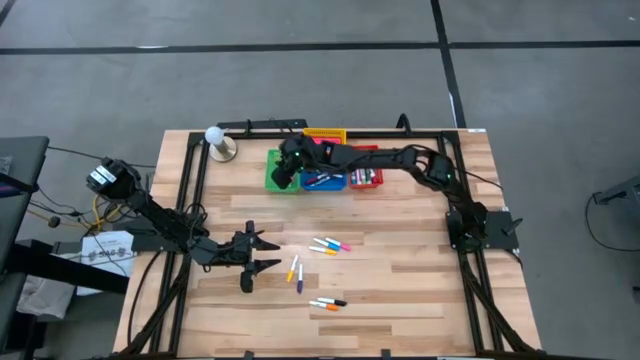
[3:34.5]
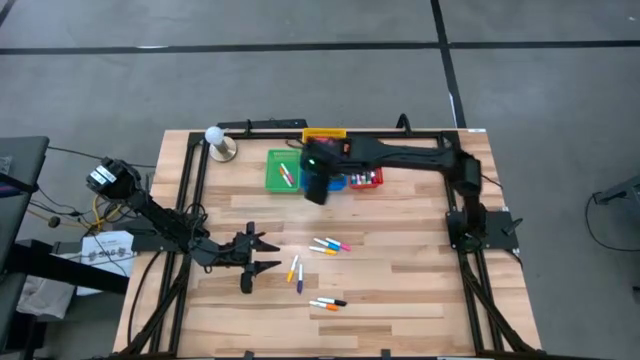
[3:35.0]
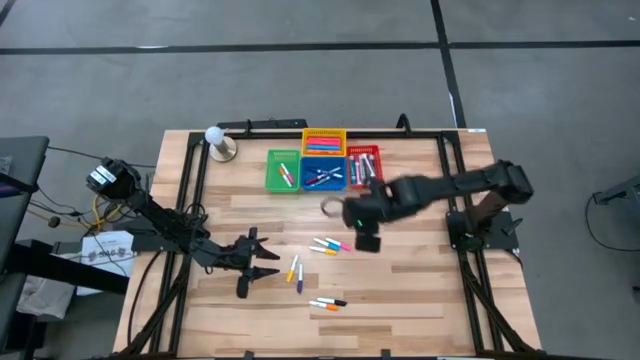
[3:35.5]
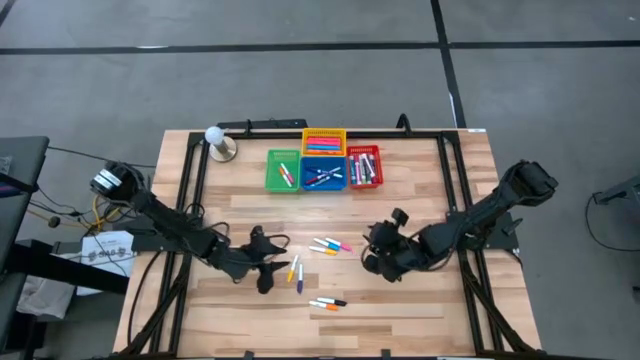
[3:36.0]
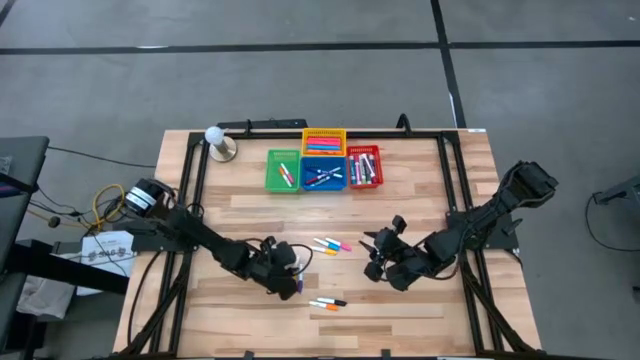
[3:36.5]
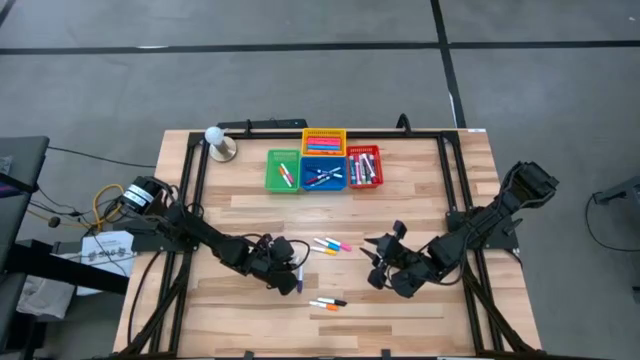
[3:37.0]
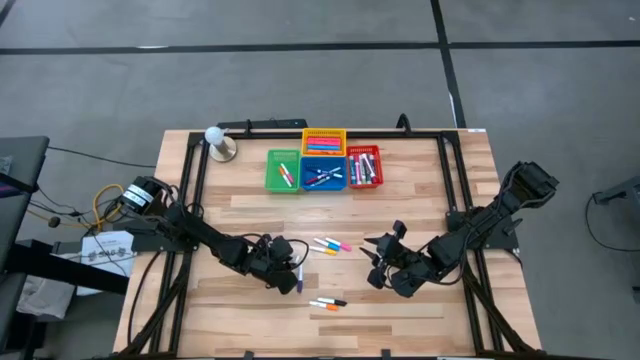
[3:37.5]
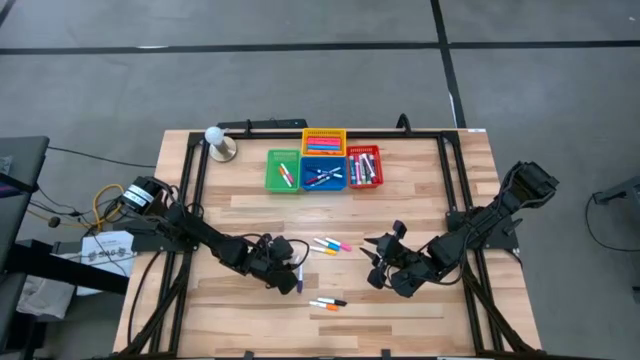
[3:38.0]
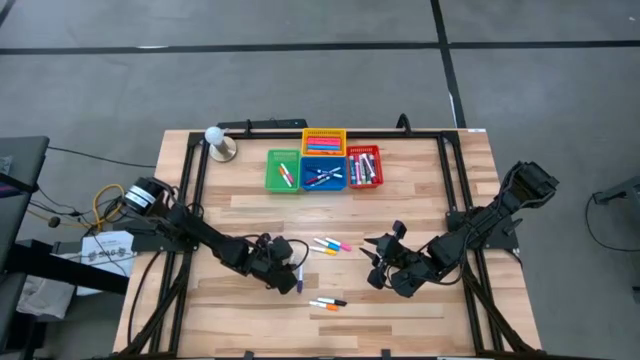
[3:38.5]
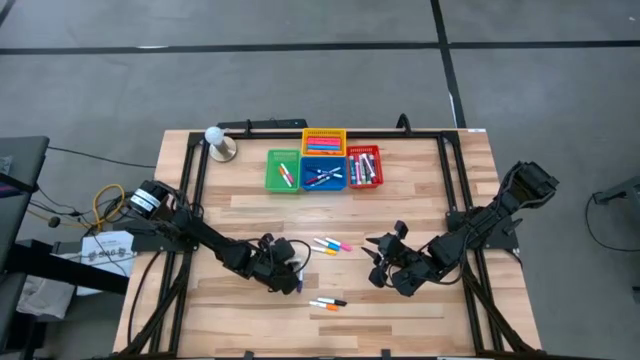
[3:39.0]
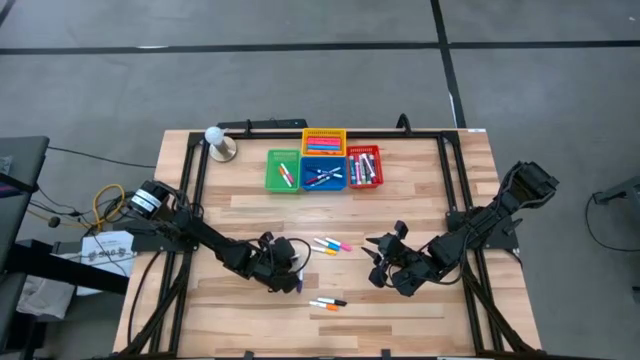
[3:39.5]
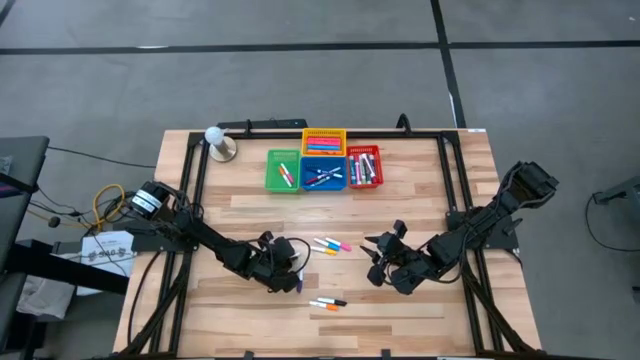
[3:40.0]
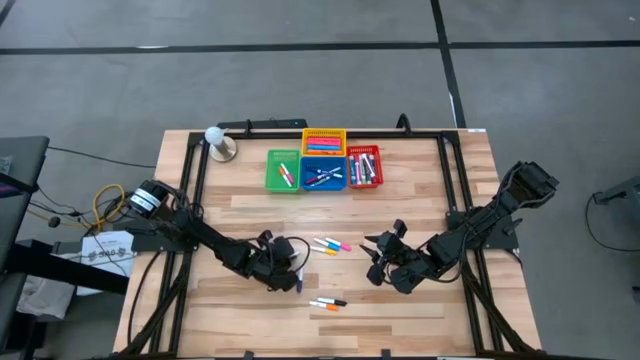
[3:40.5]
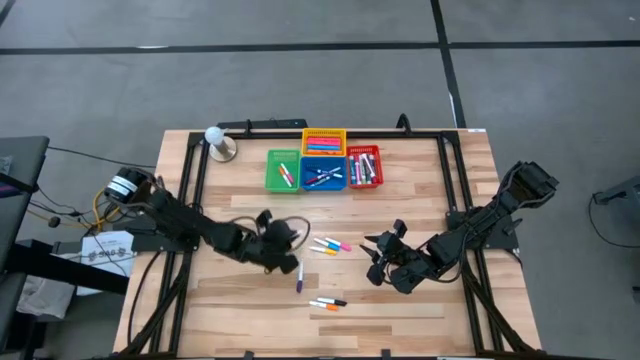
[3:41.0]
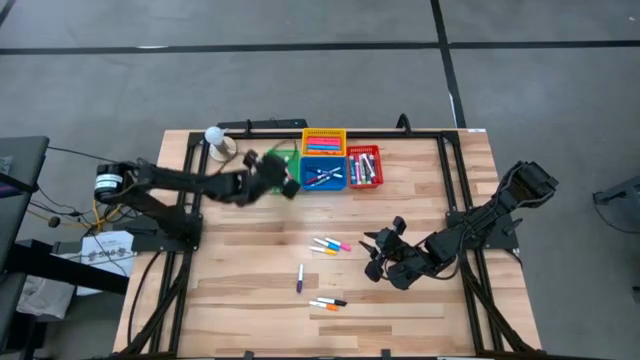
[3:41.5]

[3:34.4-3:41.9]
Task: Pick & Place Markers
Put the bottom small yellow highlighter pen into the green bin

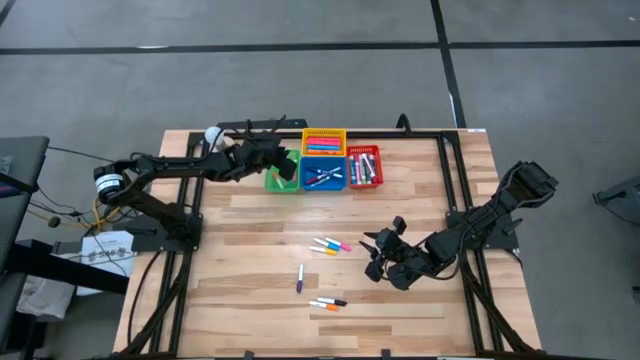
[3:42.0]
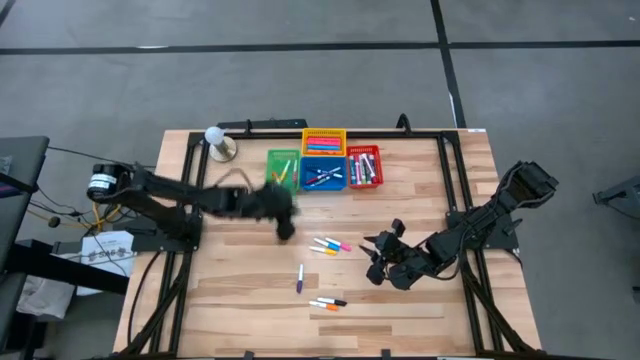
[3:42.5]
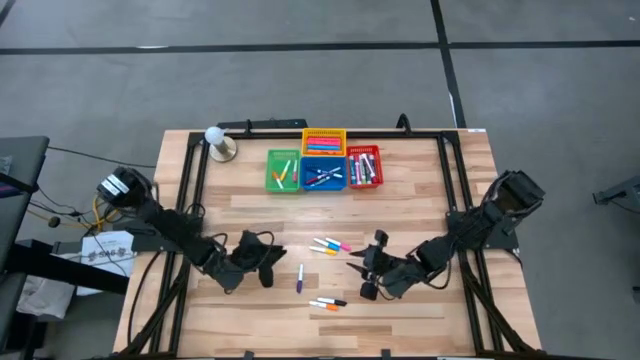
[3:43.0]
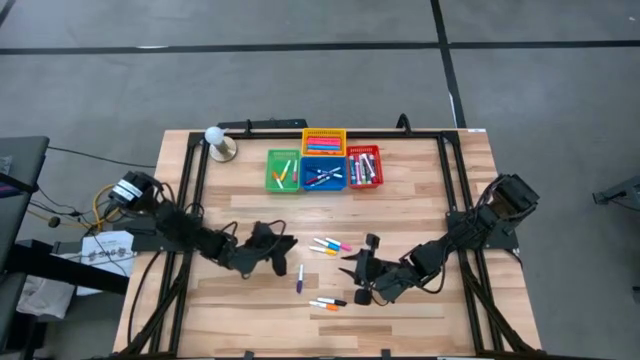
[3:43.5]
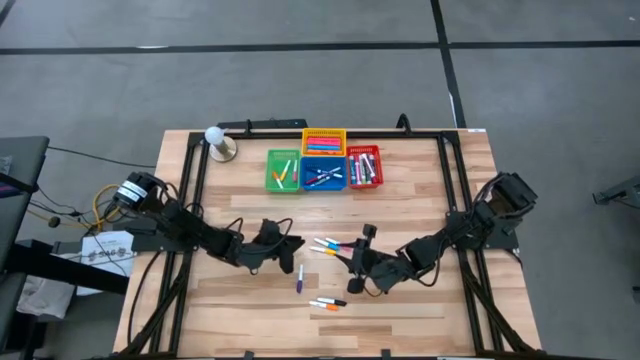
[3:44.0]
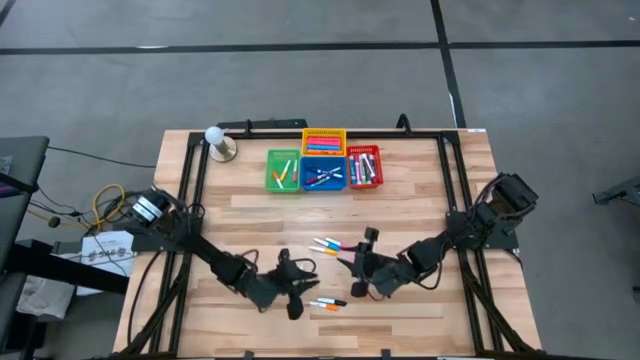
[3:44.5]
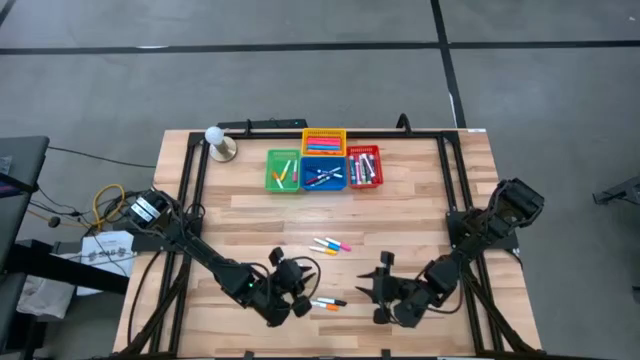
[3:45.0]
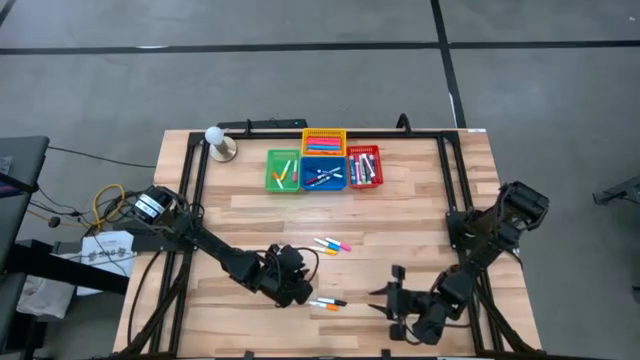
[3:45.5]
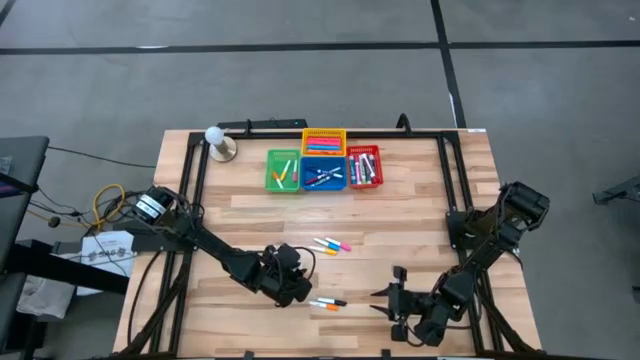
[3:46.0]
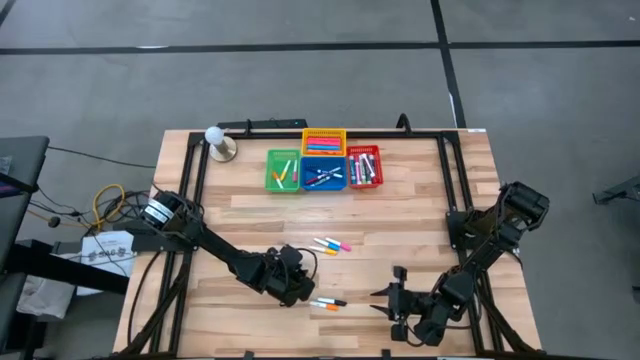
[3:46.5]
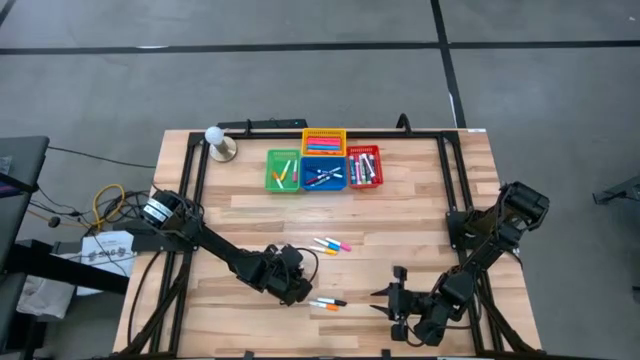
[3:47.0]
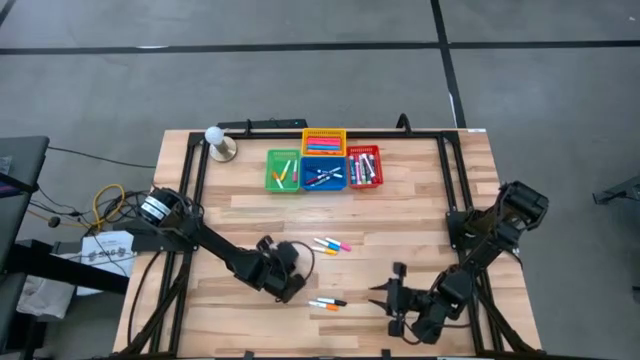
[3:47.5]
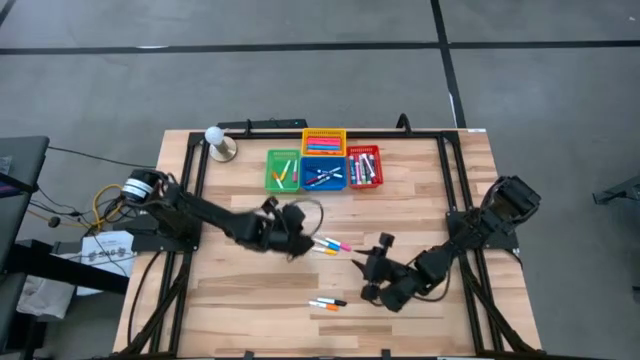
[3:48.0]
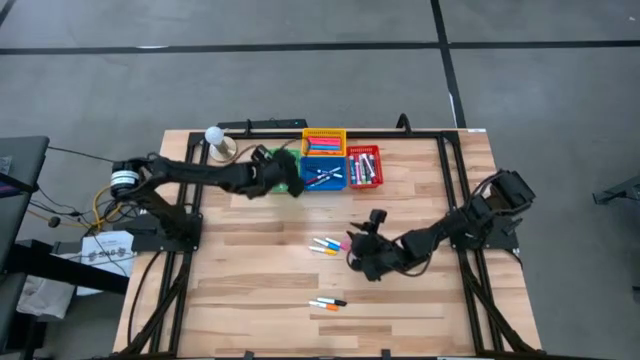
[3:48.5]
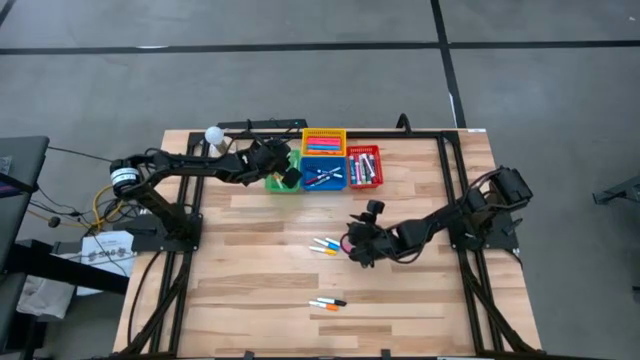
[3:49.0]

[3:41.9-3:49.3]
Put the purple small highlighter pen into the green bin

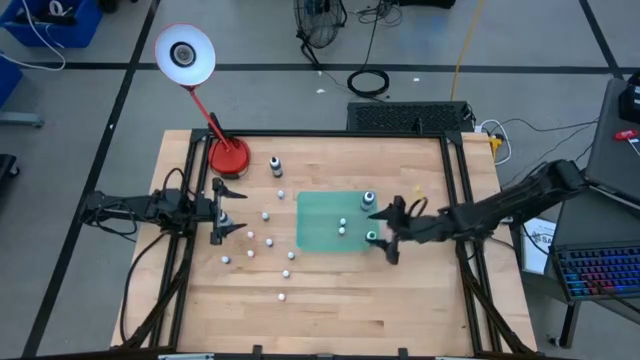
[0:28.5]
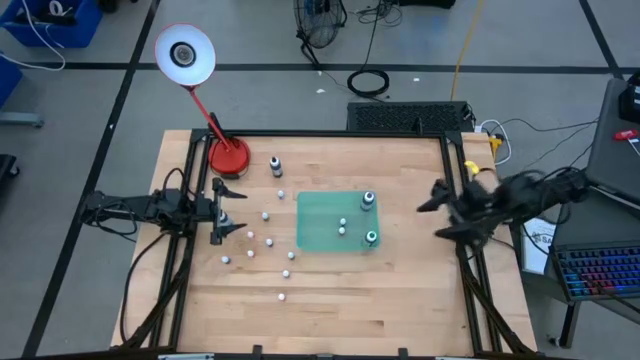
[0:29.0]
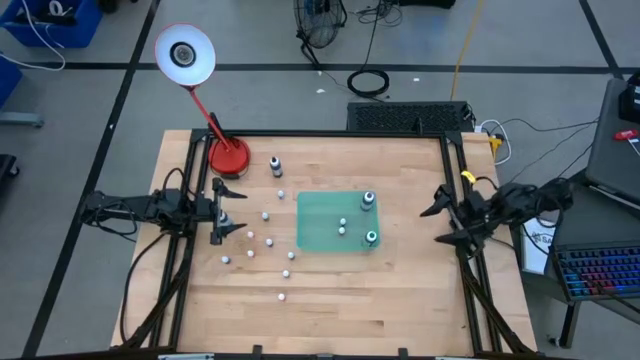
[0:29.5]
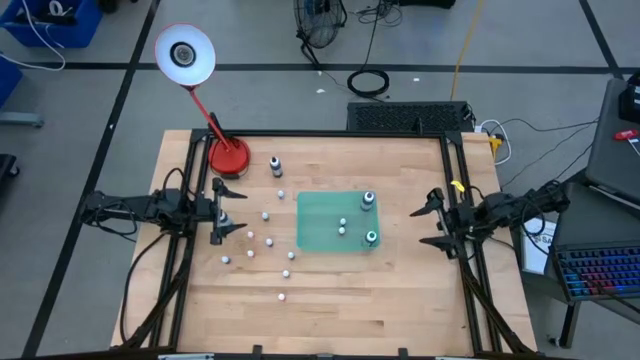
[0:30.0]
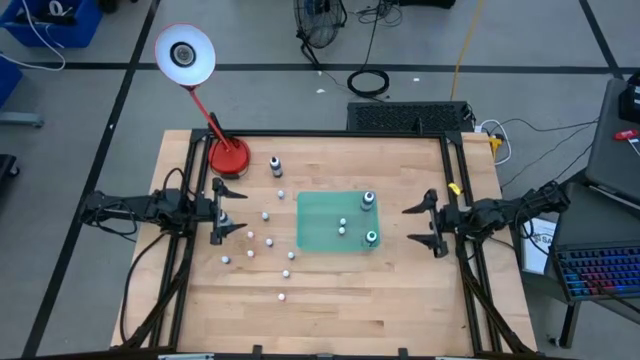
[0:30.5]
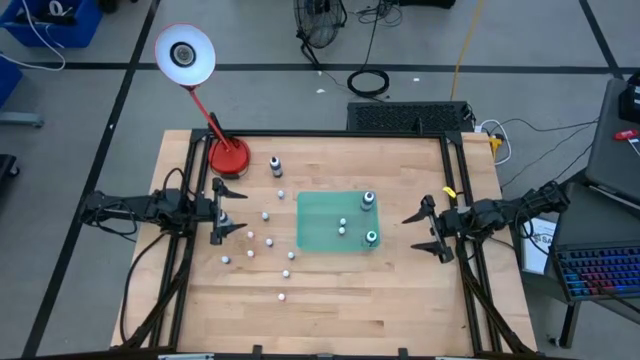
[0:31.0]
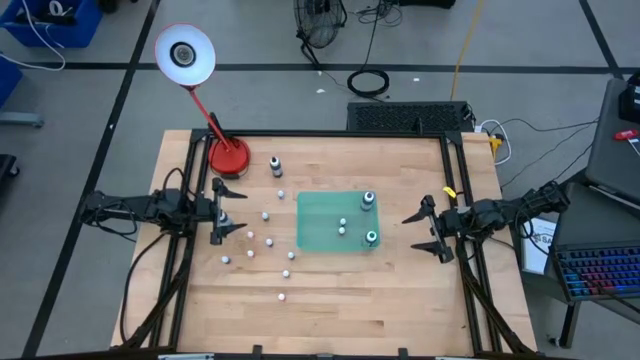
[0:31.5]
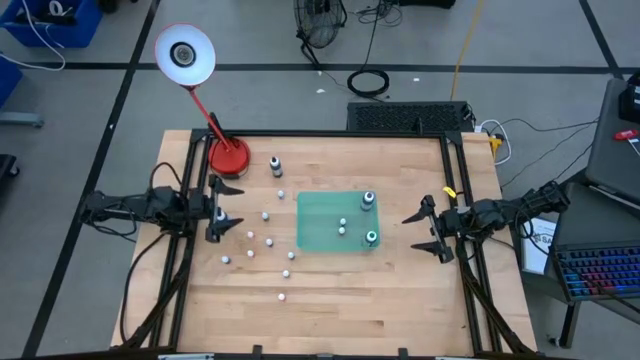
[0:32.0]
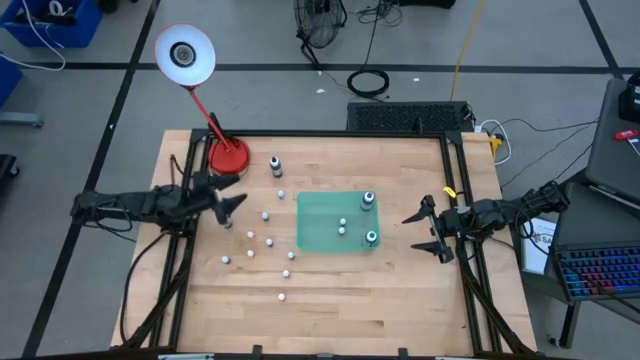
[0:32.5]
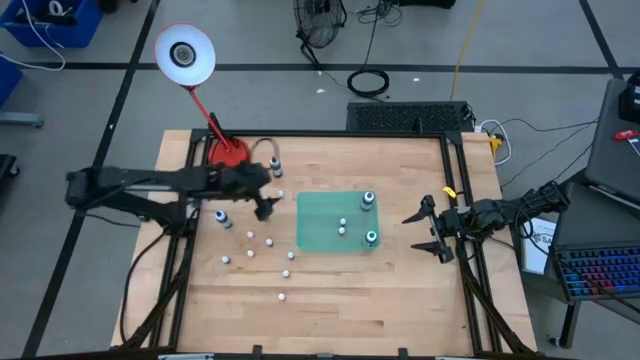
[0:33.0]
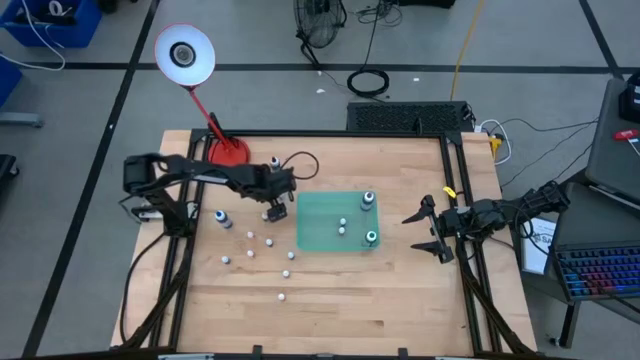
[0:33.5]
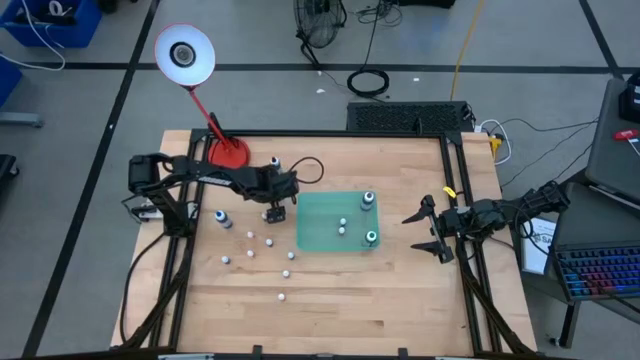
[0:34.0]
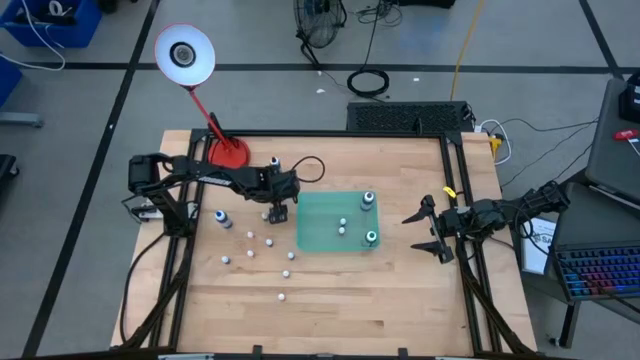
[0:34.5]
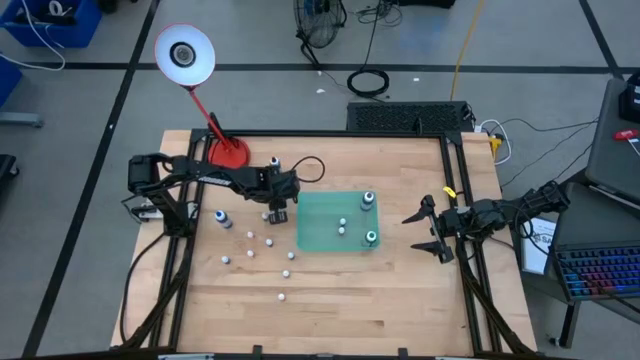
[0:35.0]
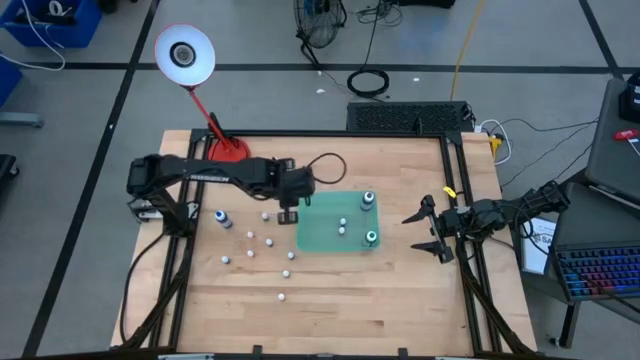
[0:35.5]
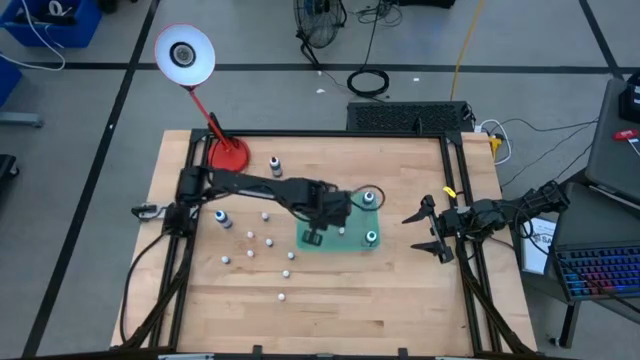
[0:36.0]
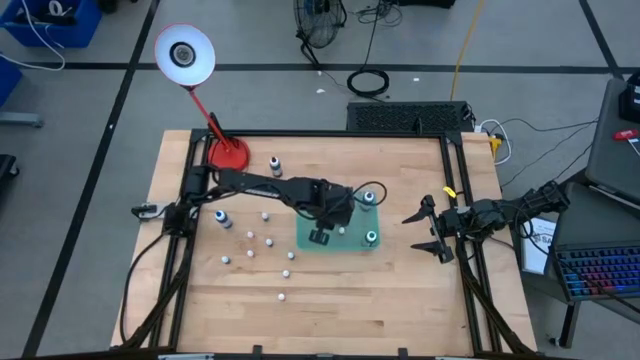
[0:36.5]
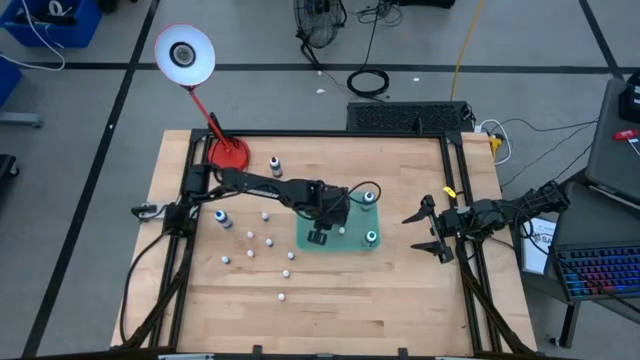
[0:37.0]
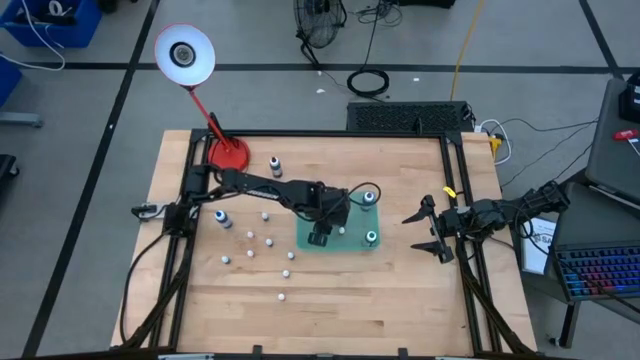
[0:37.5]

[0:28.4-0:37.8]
Task: Pick & Place food coloring
Put the small blue food coloring bottle into the blue bin
